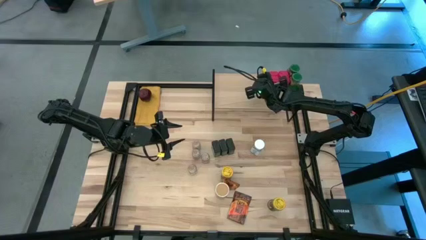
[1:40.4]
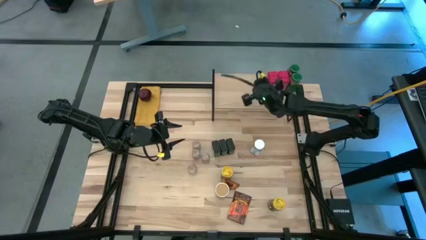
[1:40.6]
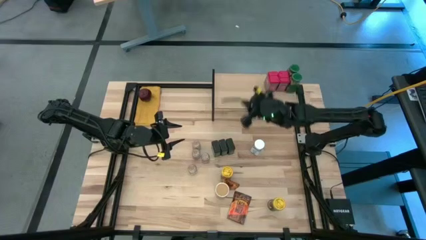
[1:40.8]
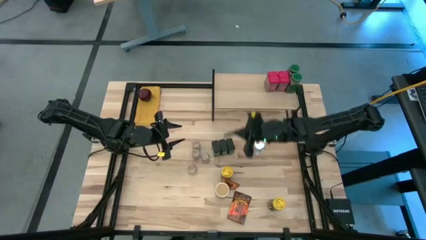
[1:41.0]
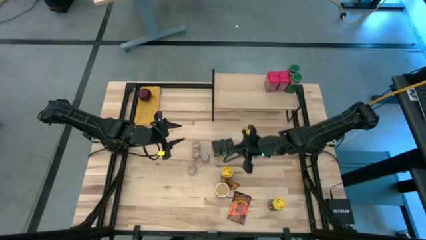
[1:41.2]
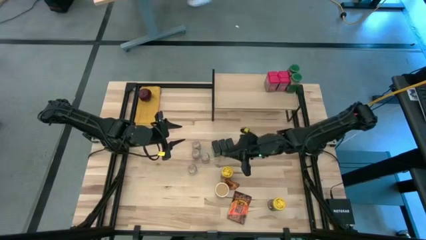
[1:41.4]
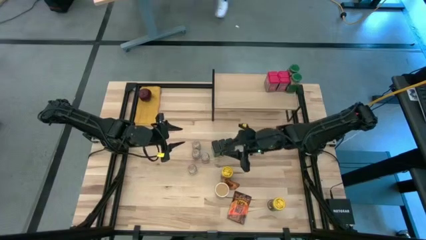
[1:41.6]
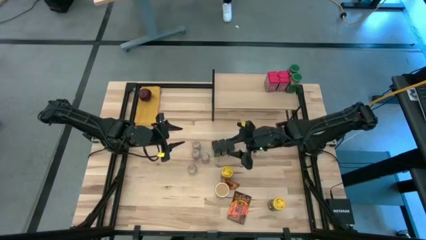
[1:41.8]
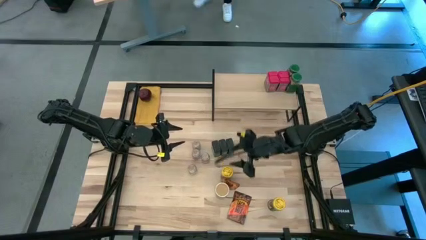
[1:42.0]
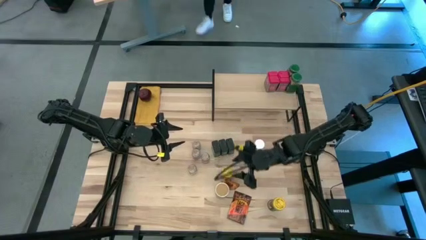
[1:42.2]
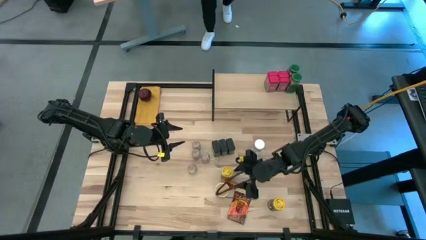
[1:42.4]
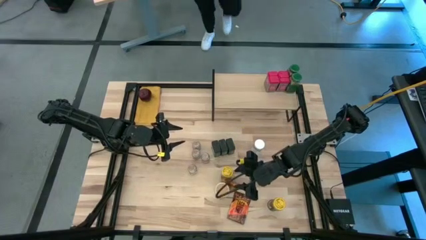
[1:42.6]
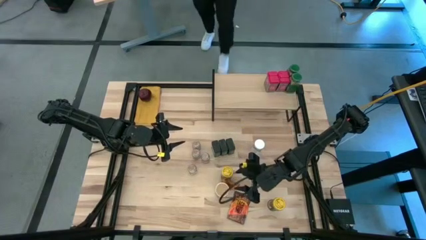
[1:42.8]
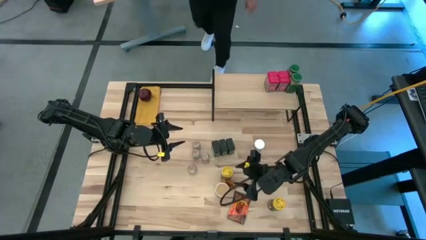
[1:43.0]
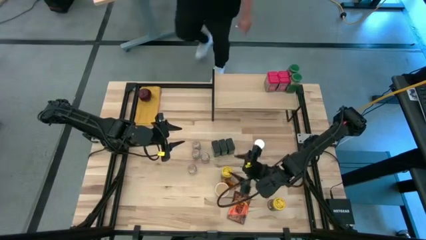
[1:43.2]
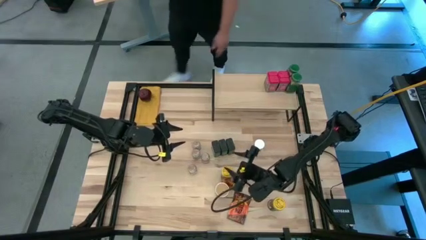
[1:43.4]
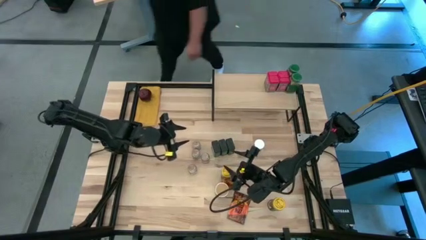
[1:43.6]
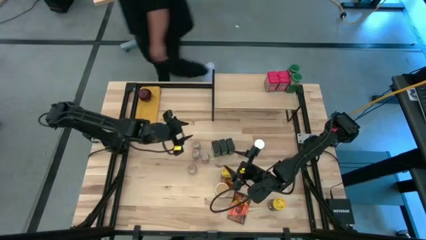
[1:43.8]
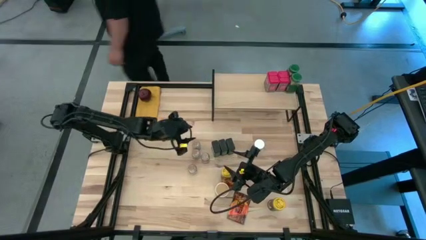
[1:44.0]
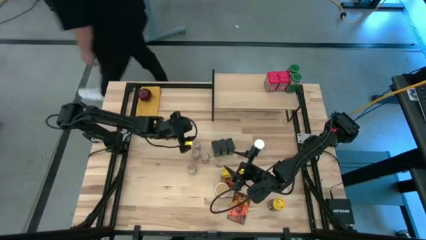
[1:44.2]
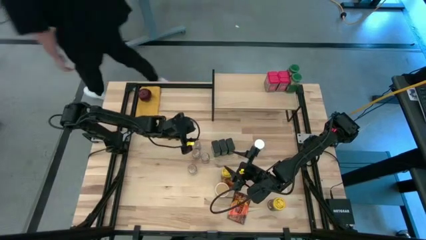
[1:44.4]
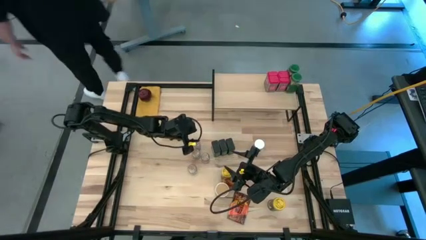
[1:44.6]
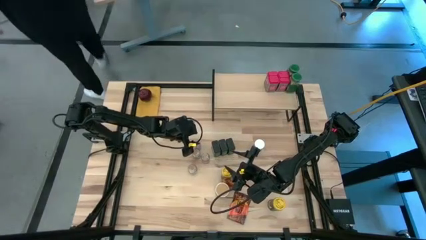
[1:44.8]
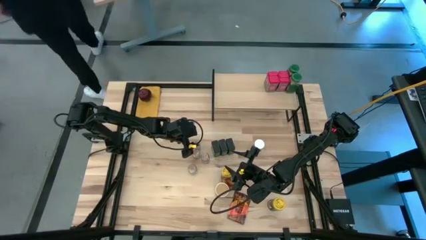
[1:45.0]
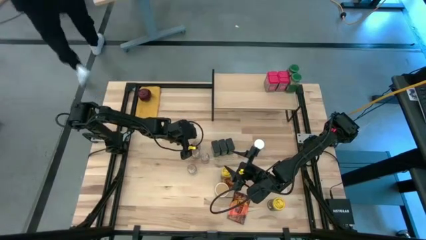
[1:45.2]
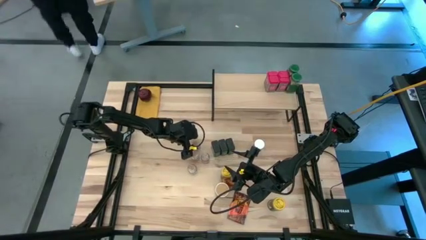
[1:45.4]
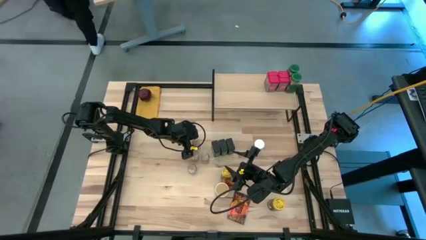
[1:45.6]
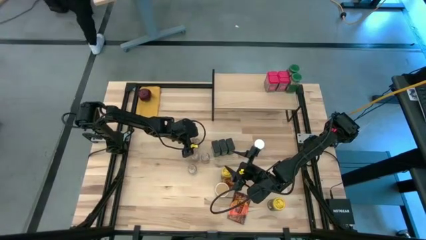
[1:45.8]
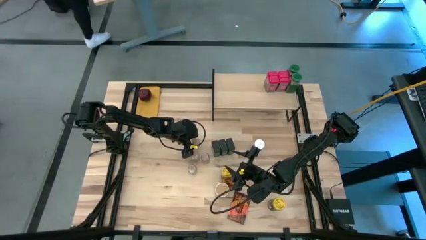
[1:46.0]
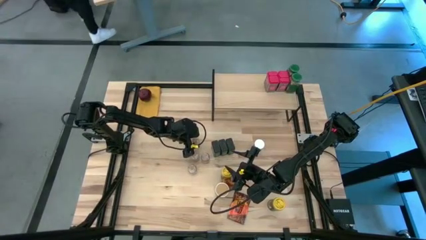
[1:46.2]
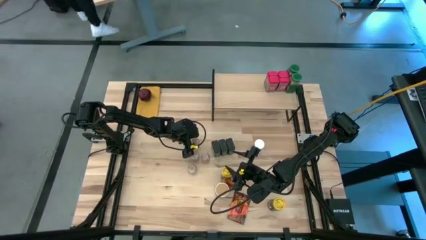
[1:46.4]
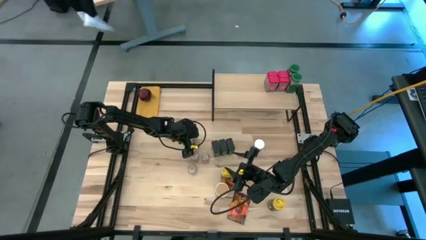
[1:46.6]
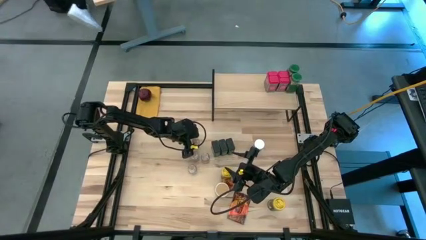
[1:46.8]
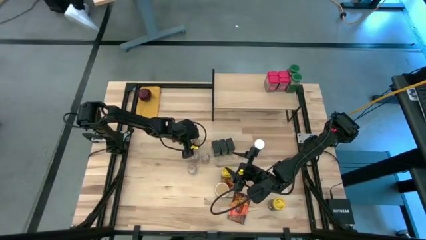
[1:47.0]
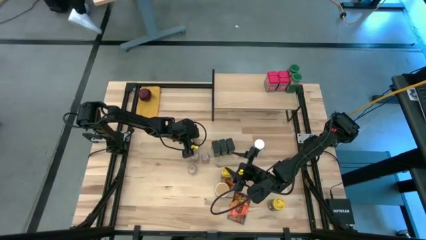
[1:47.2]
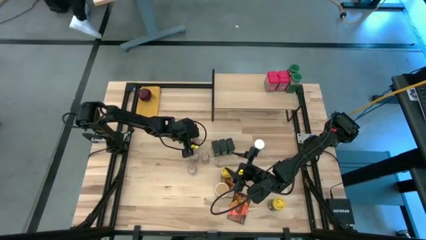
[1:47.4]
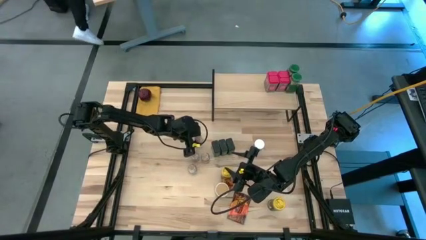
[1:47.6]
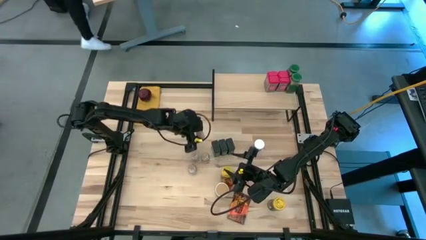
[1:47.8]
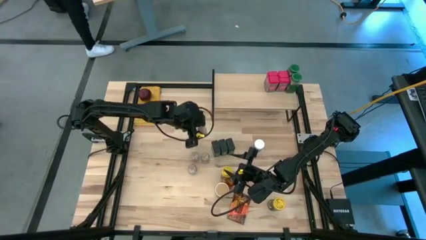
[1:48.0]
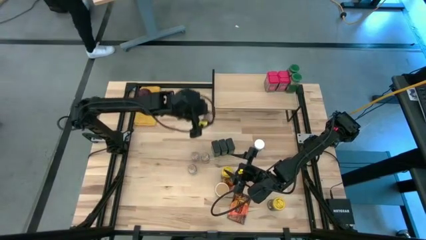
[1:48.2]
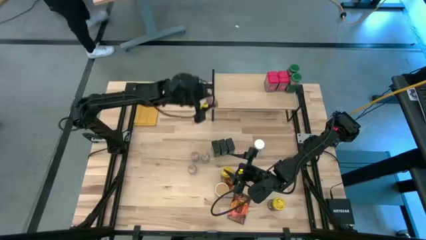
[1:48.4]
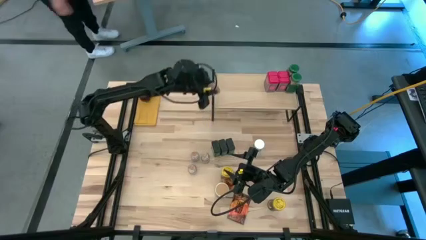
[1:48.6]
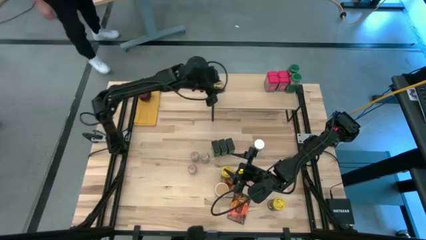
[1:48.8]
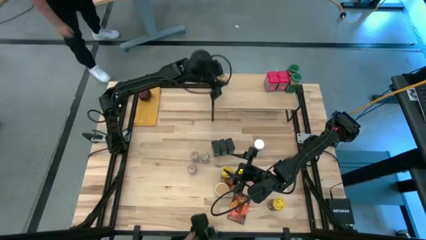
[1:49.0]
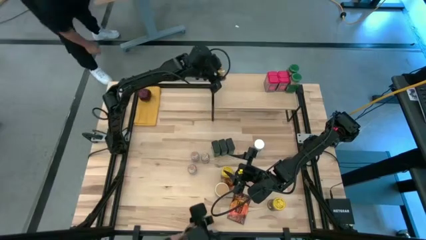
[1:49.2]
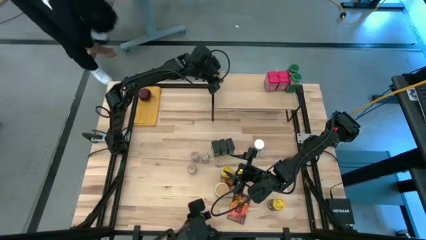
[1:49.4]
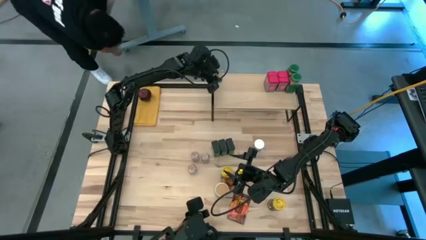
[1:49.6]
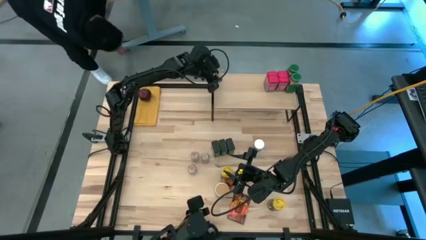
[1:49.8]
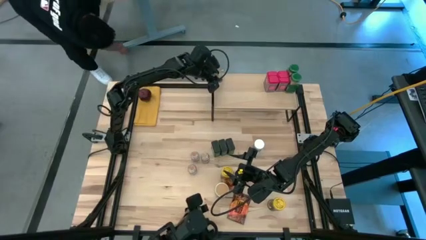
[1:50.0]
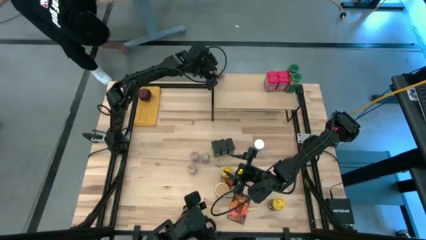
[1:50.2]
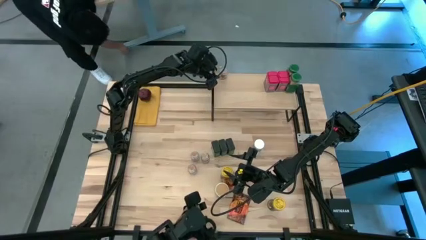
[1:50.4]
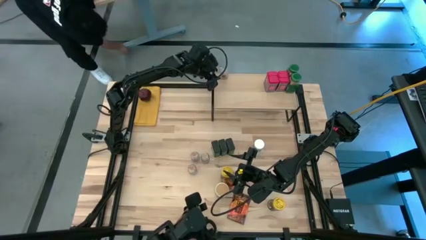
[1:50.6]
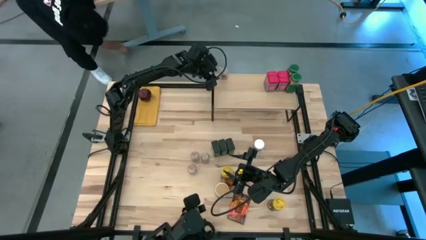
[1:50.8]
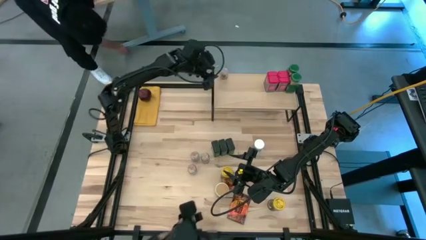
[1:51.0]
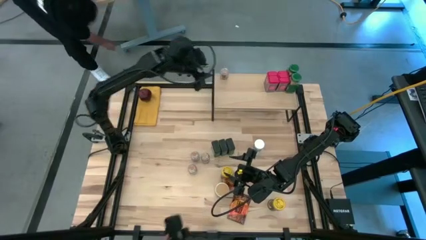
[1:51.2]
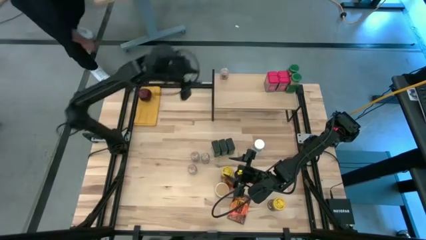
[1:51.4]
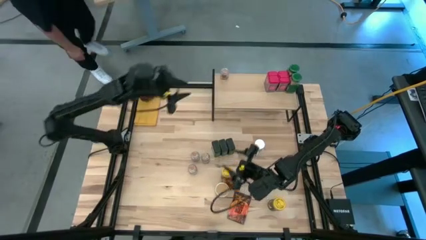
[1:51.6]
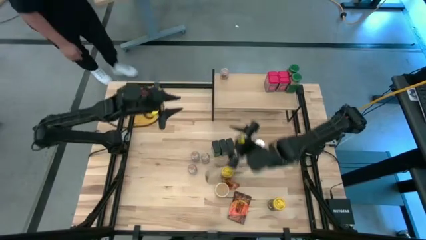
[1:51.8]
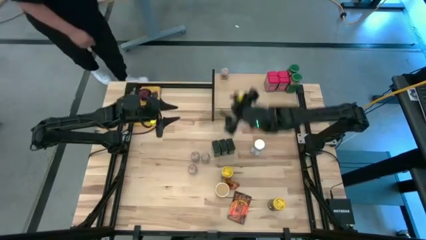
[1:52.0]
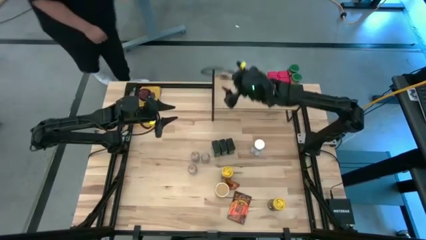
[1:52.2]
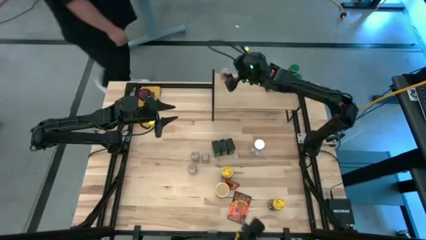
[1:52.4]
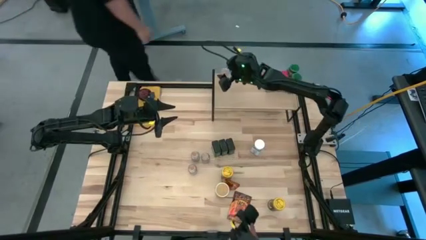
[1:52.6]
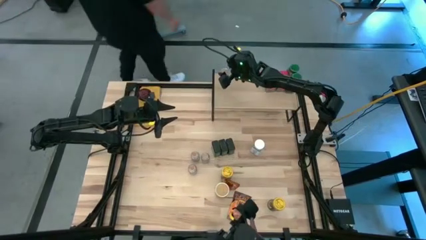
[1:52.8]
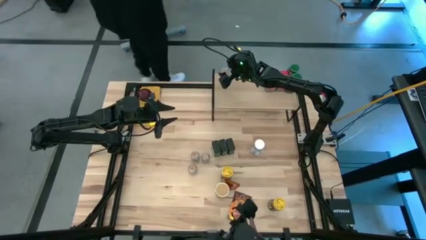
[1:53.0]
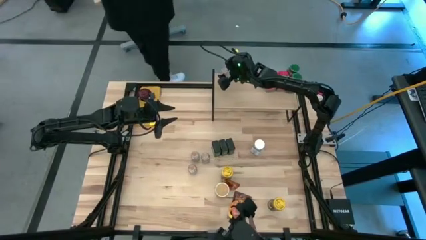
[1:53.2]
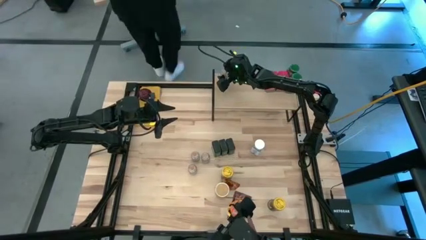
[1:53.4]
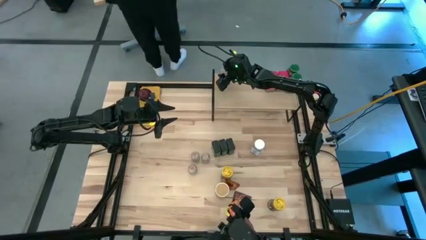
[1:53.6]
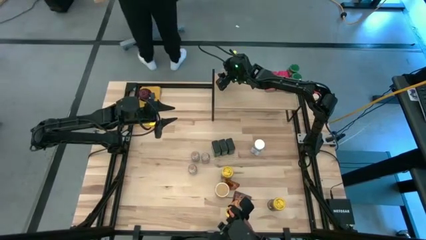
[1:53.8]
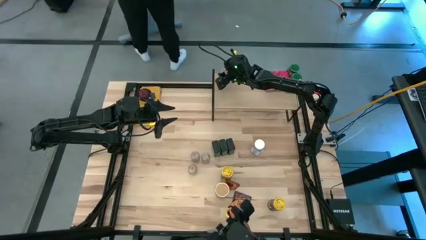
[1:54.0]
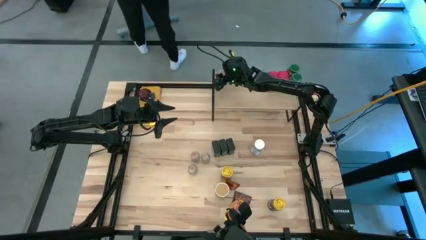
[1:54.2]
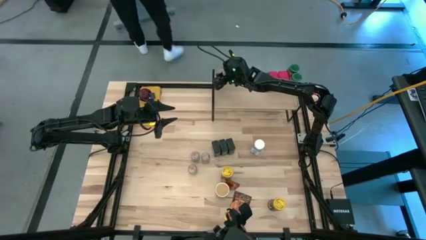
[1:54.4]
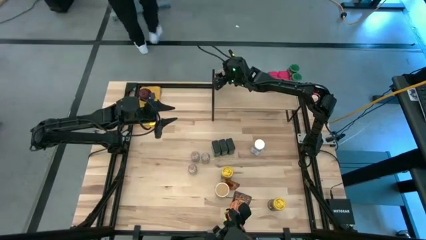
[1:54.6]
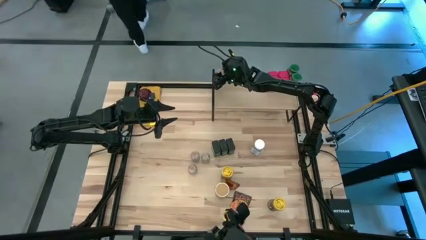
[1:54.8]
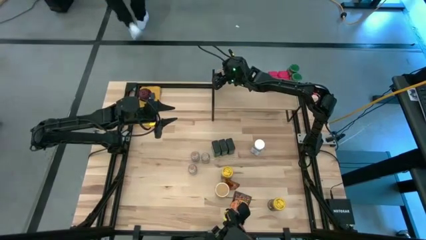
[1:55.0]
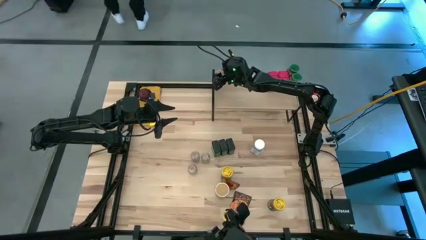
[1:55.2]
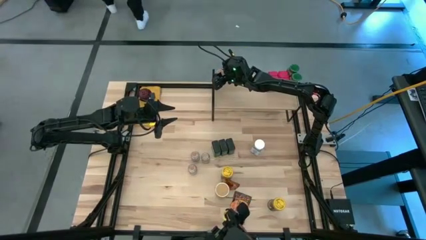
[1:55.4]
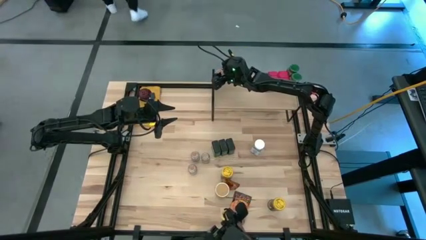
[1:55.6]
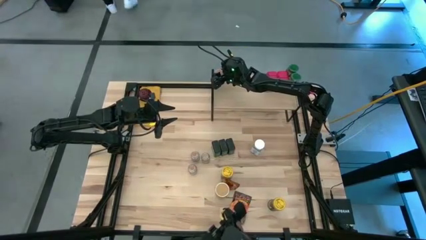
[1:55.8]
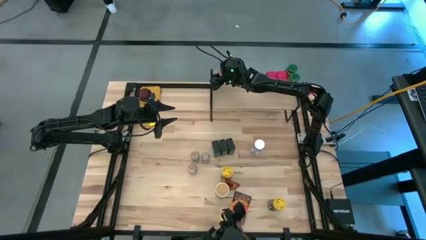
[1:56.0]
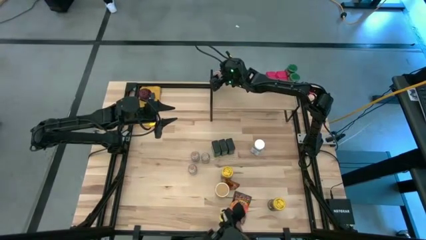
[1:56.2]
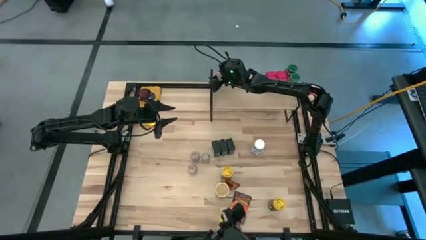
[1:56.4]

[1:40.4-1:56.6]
Task: Shelf spices
Put the top brown seasoning bottle on the shelf
